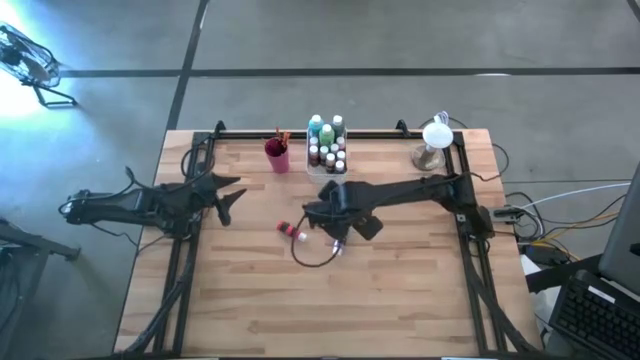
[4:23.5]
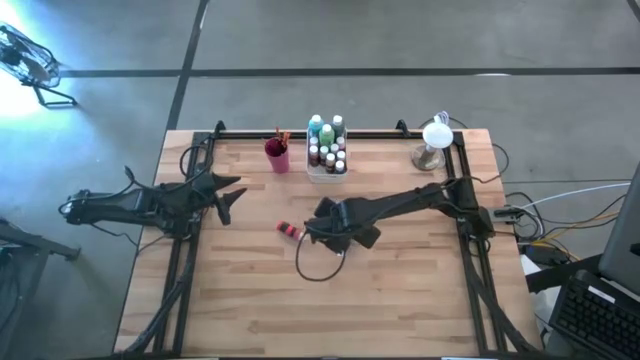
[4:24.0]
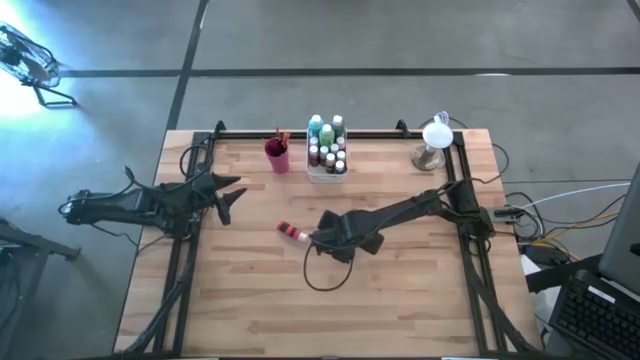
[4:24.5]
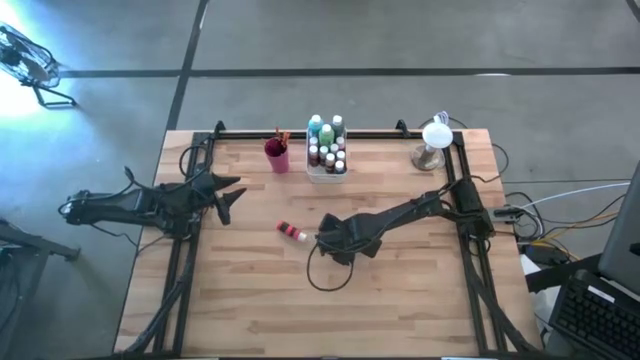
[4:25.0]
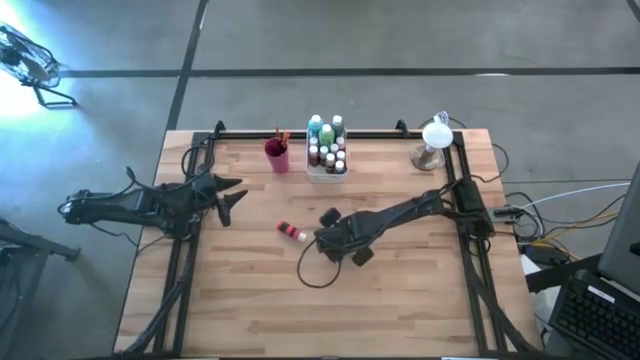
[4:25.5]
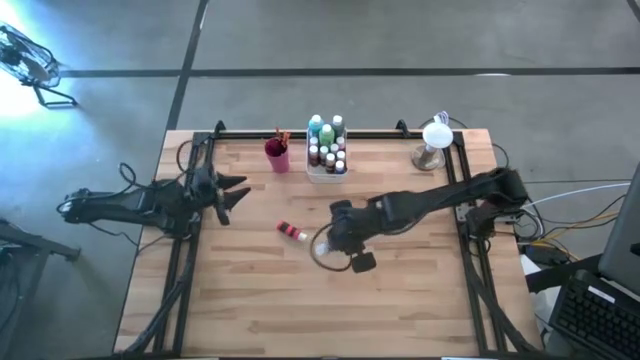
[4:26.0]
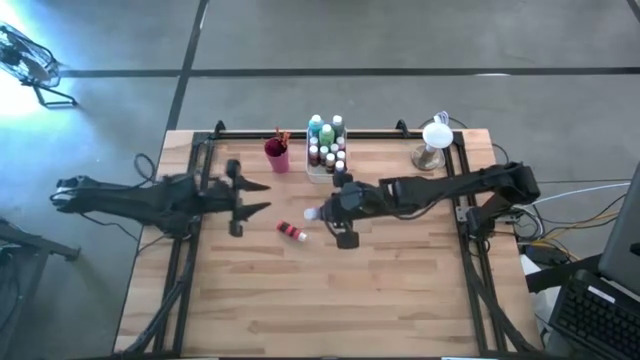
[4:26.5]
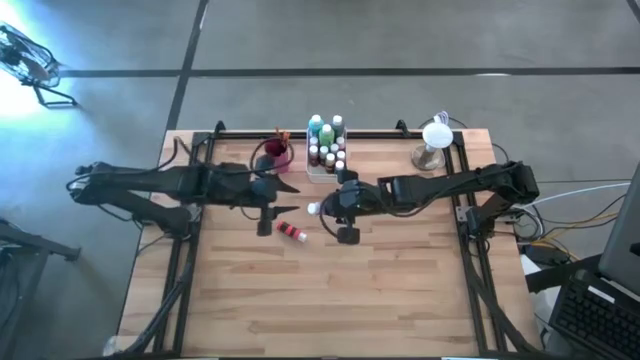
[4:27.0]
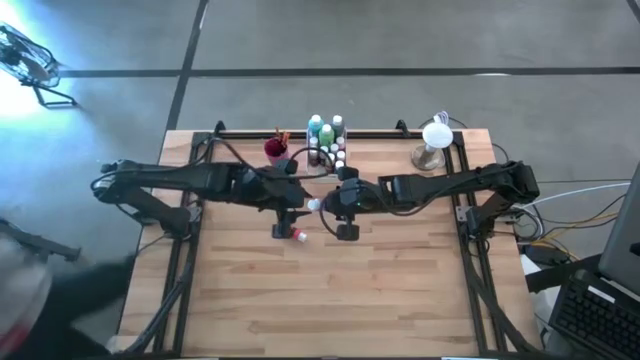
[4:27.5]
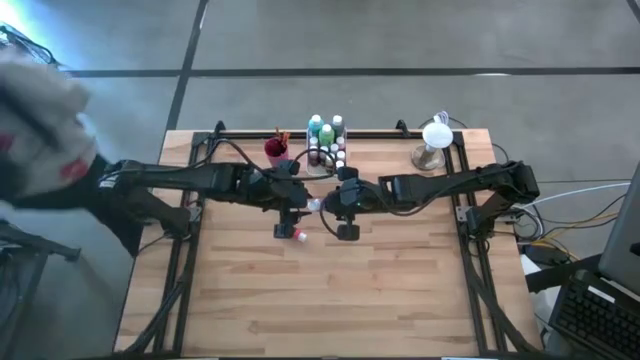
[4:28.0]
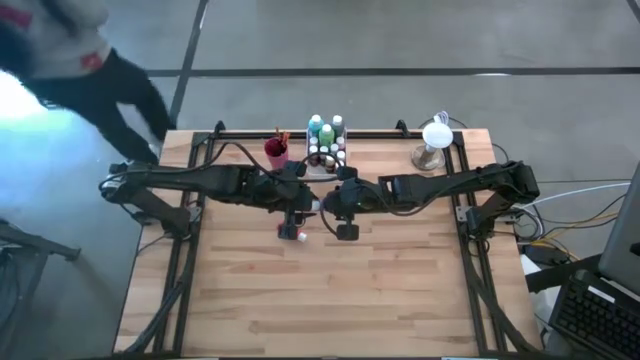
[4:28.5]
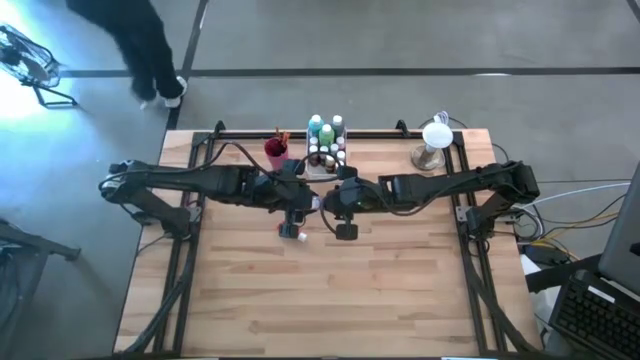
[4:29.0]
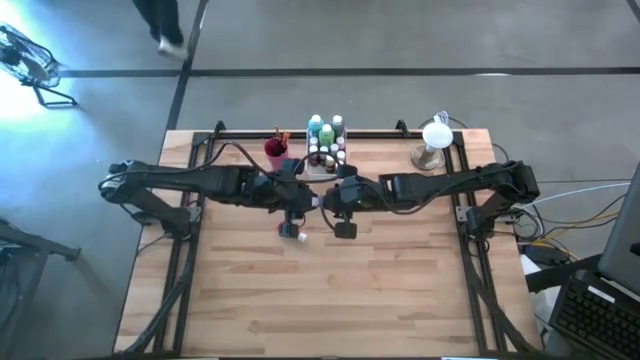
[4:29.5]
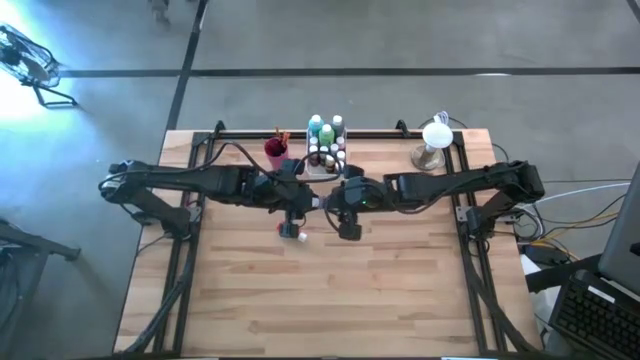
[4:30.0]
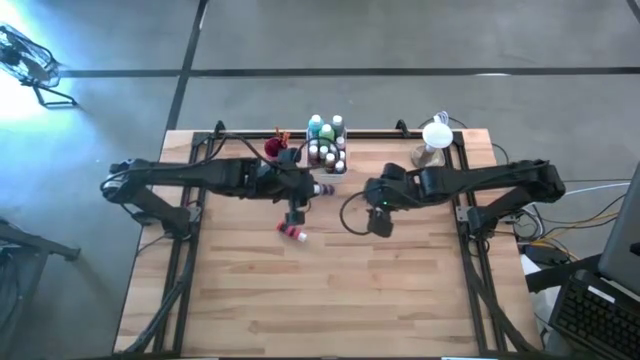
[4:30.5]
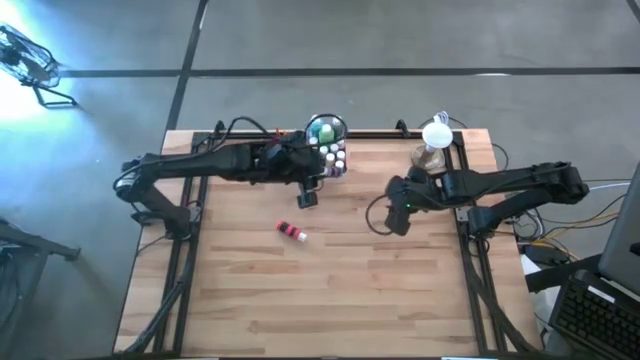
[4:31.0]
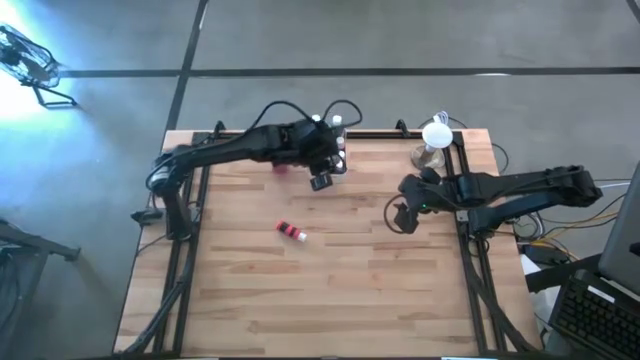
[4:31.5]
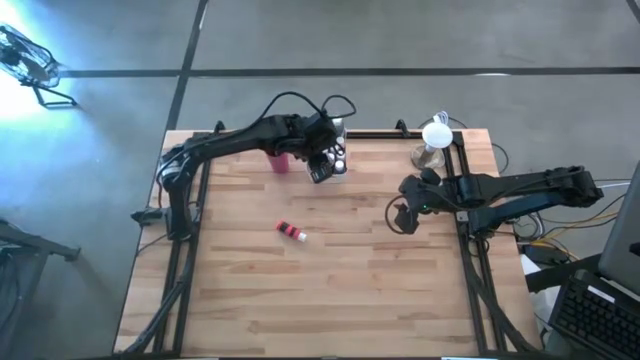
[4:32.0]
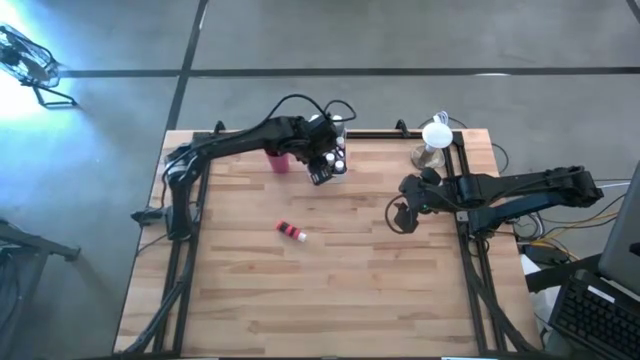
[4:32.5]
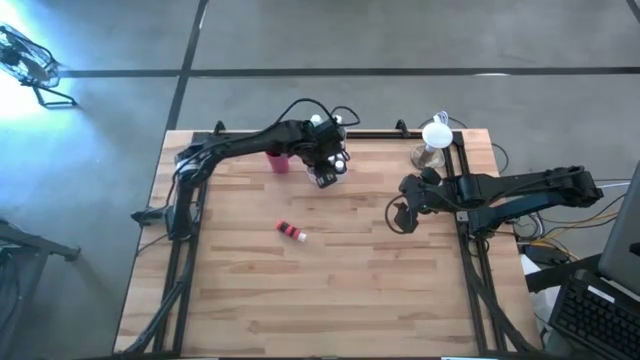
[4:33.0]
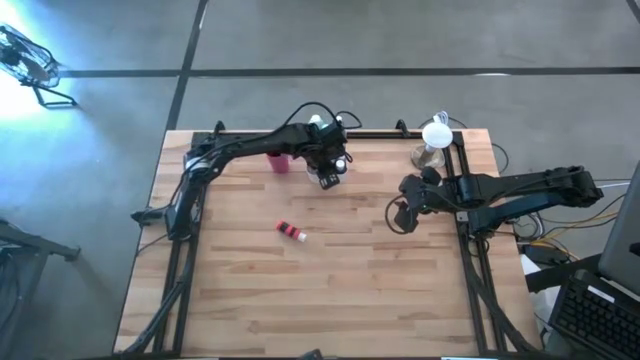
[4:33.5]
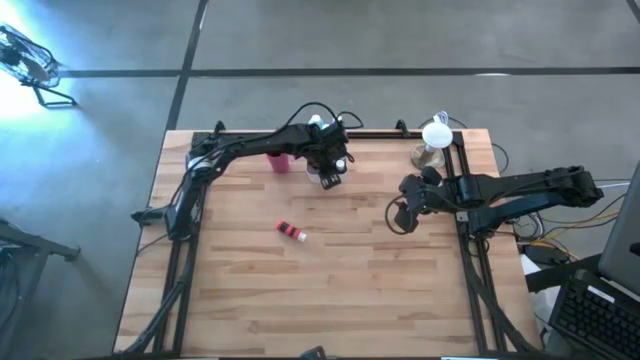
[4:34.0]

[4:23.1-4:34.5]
Task: Pick & Place Paint Supplies
Put the violet paint bottle into the white bin

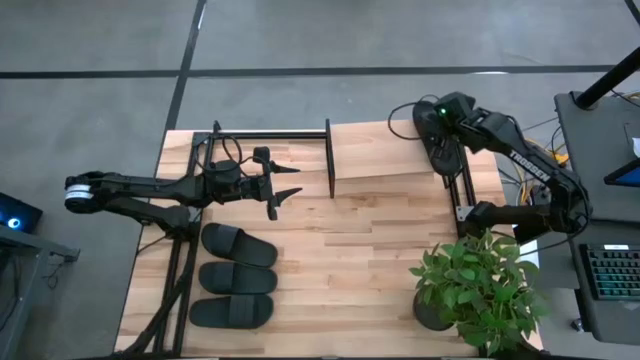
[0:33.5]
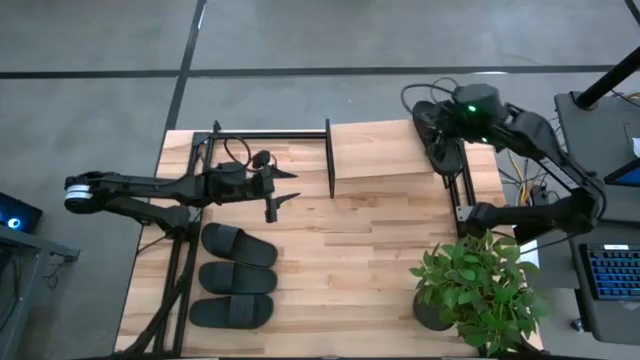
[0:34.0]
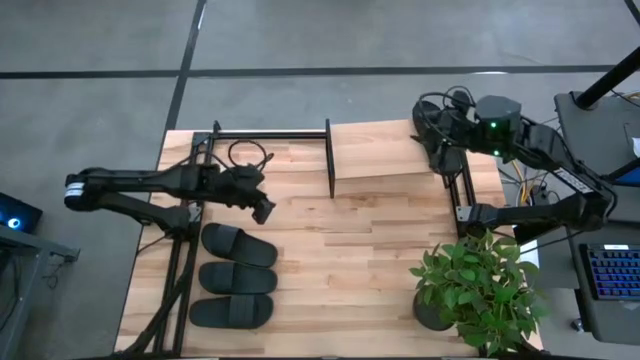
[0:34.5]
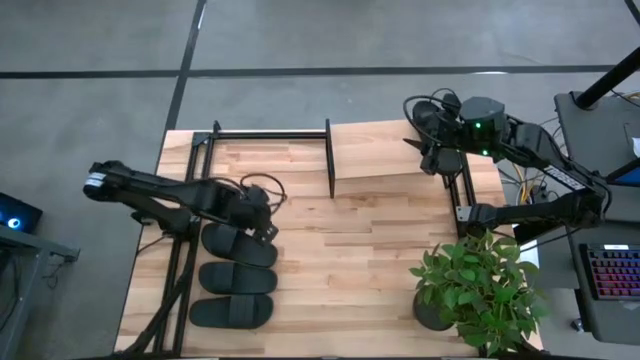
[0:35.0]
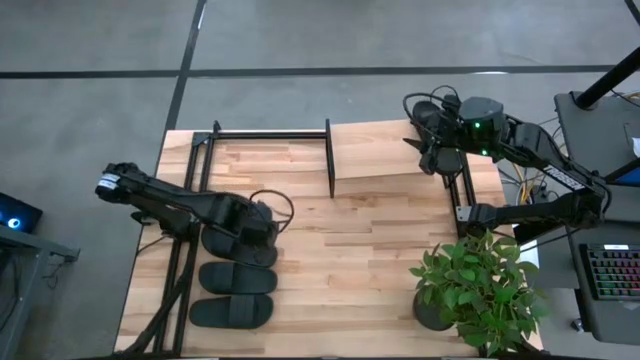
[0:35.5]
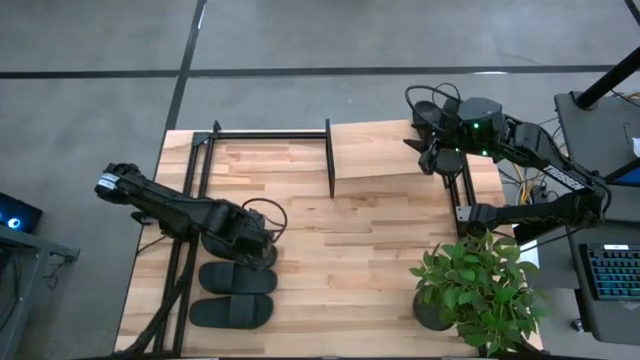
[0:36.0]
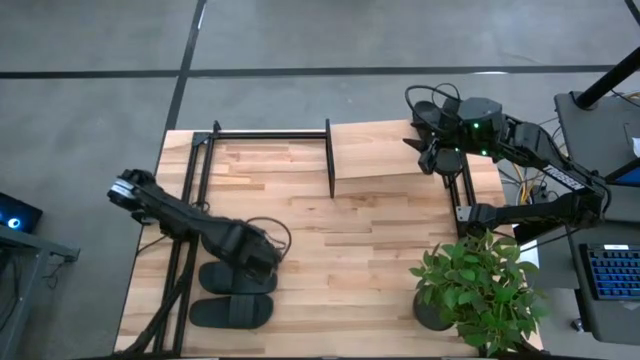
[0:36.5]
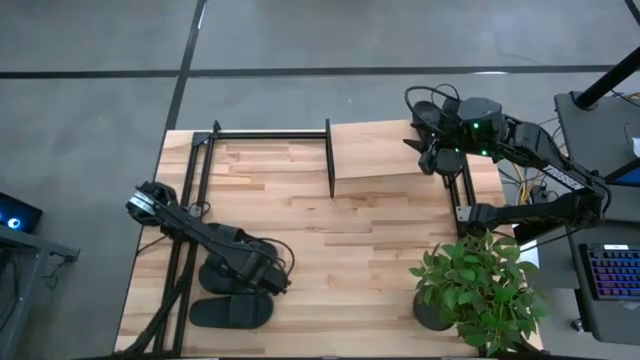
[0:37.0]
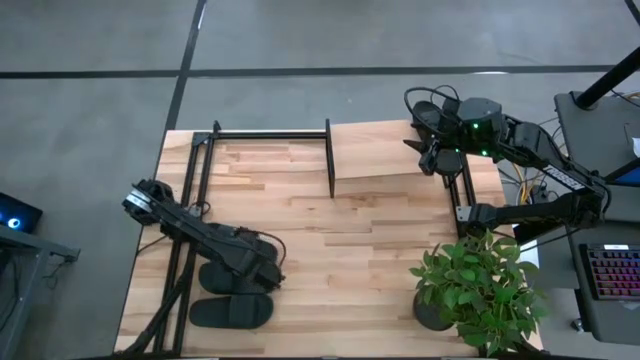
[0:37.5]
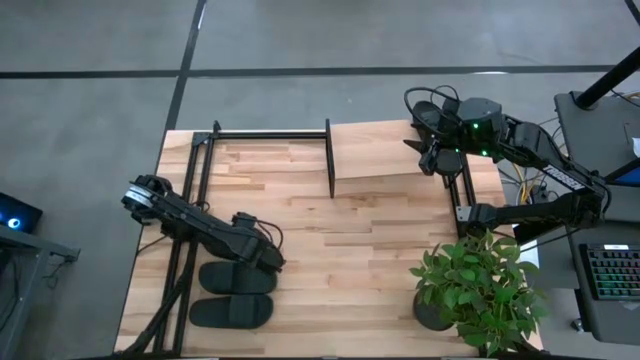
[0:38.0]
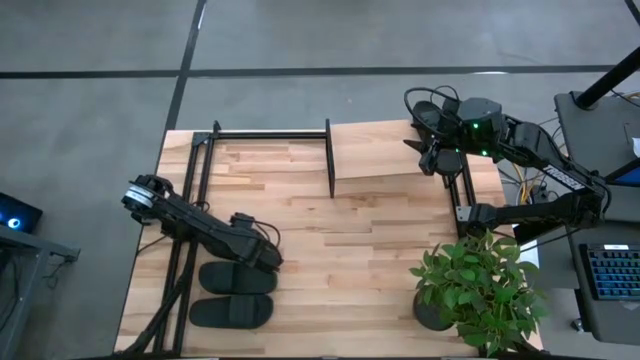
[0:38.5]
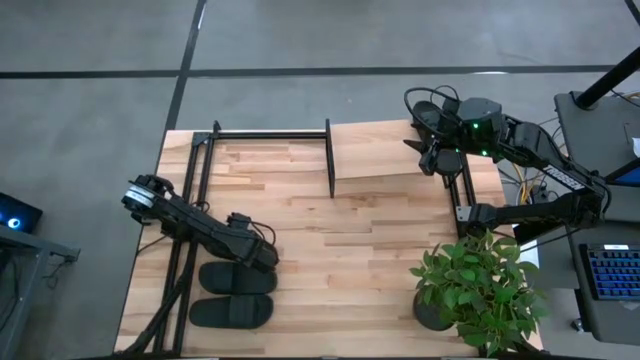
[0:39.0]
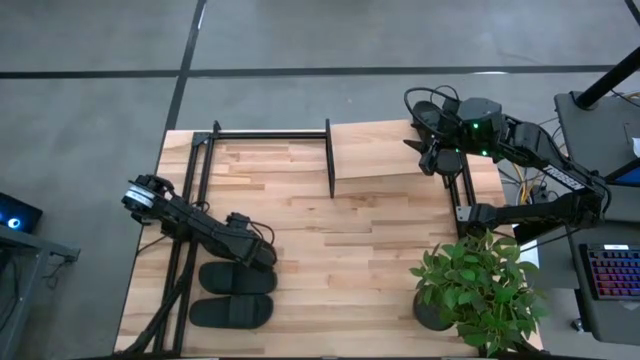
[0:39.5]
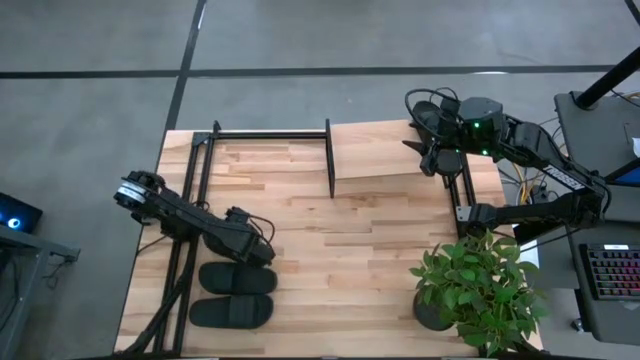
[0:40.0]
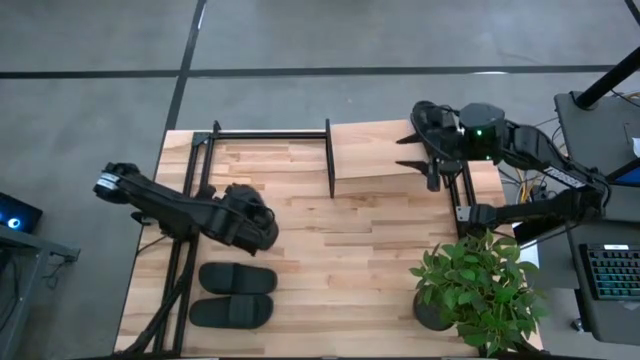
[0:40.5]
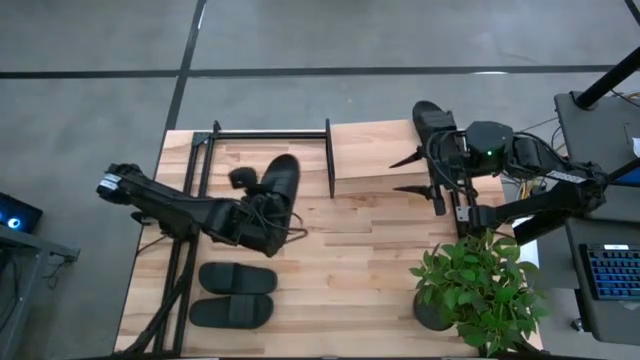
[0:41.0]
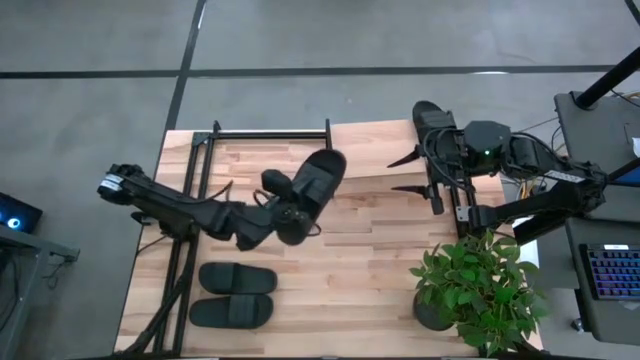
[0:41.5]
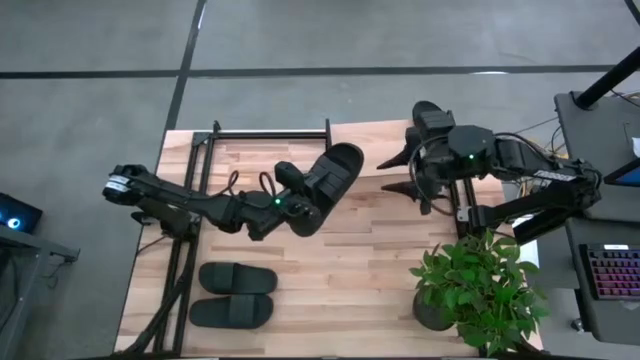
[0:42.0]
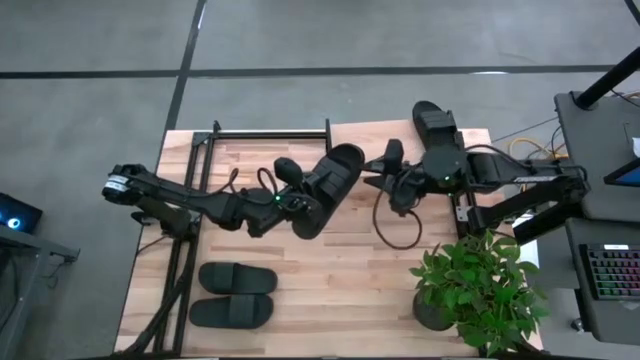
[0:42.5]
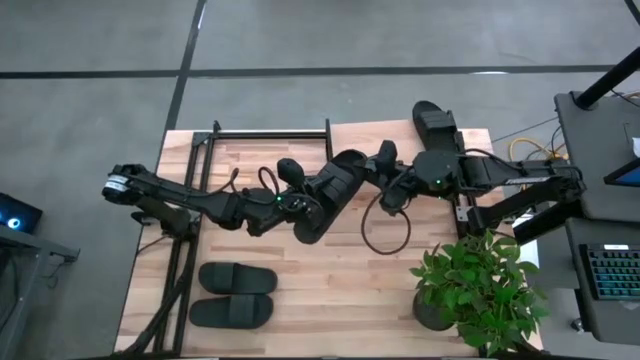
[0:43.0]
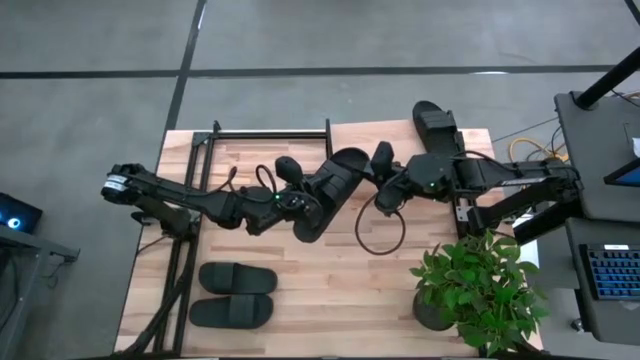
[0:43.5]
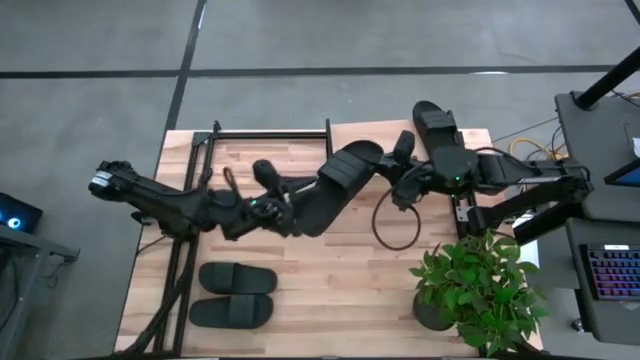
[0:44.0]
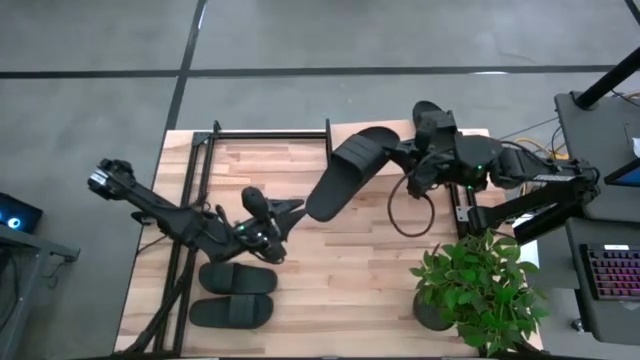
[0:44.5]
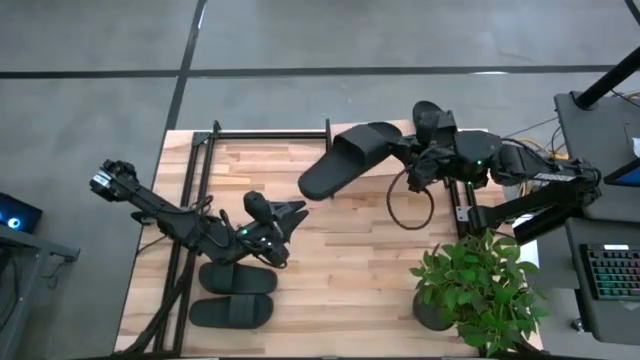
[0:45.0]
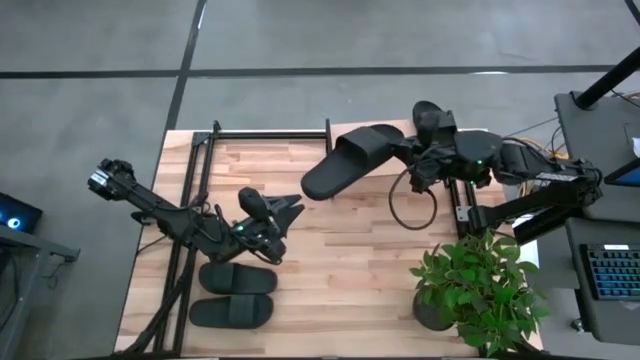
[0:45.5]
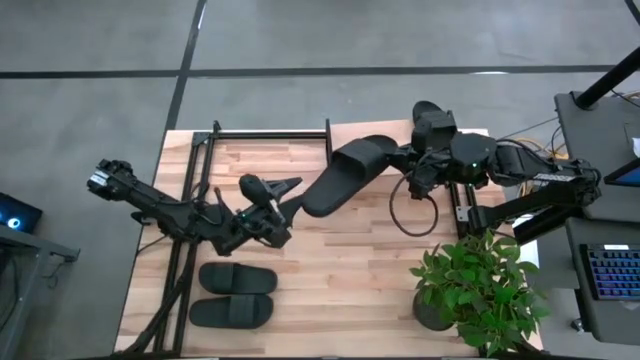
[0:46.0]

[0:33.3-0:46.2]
Task: Pick and place slides into the shelf
Put the black slipper on the shelf
